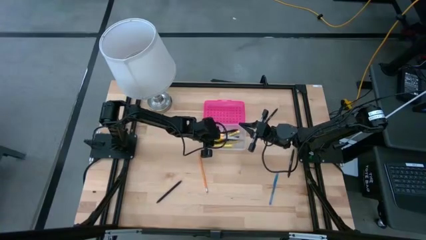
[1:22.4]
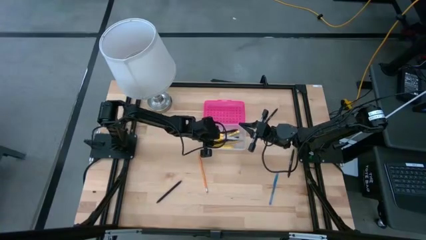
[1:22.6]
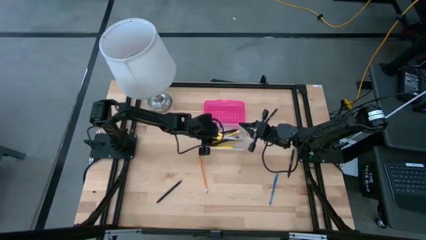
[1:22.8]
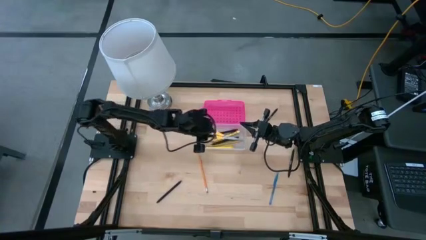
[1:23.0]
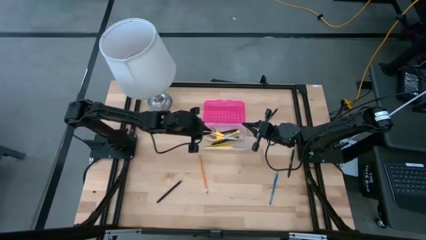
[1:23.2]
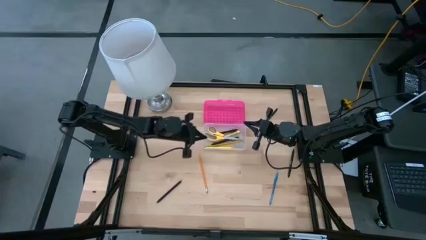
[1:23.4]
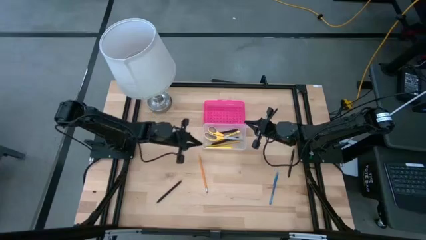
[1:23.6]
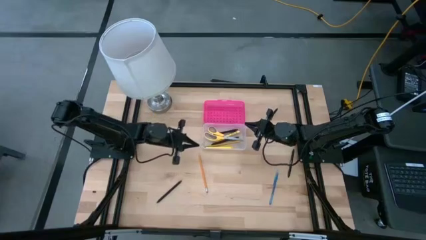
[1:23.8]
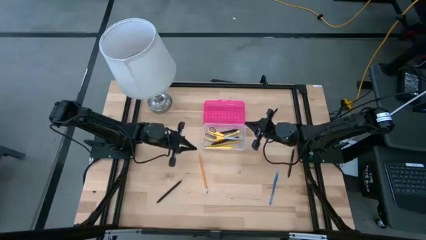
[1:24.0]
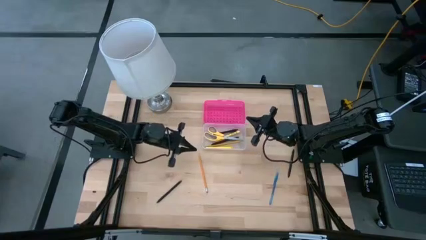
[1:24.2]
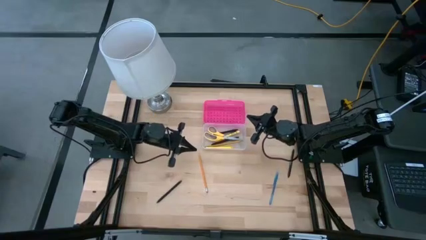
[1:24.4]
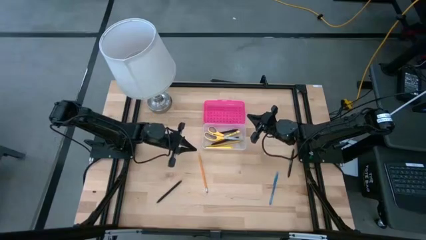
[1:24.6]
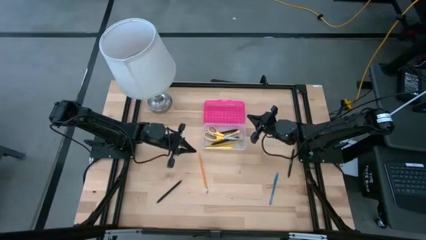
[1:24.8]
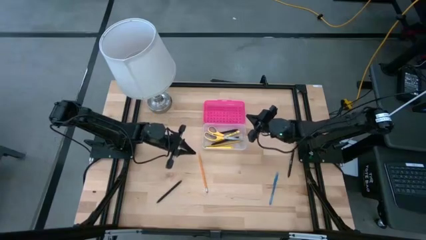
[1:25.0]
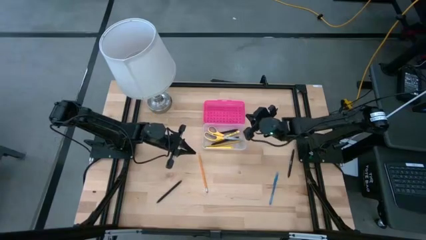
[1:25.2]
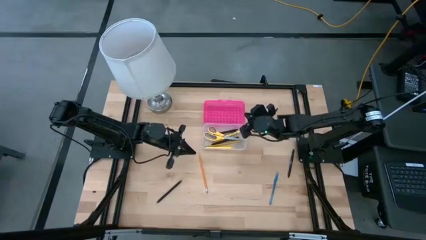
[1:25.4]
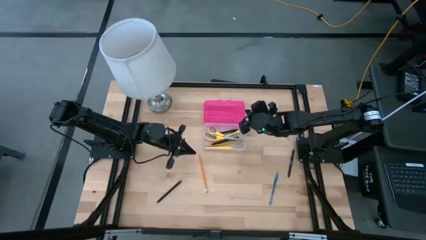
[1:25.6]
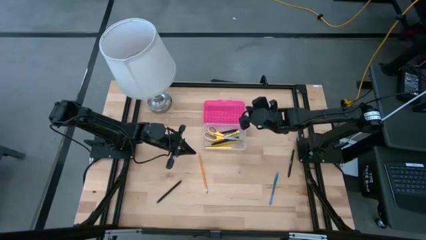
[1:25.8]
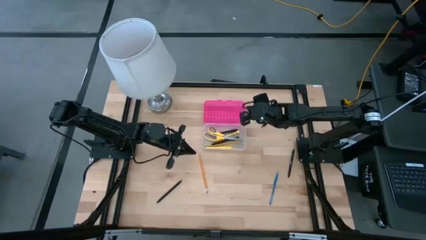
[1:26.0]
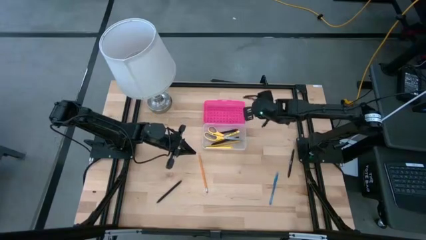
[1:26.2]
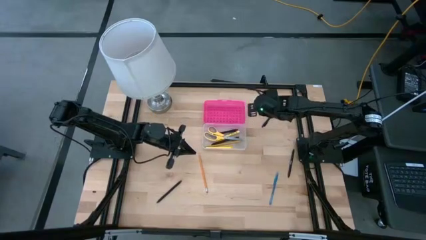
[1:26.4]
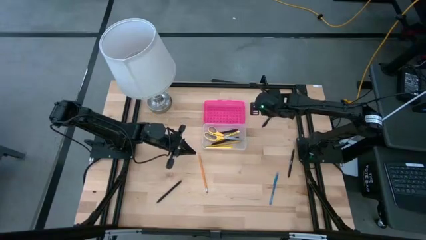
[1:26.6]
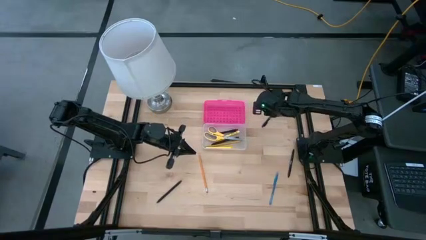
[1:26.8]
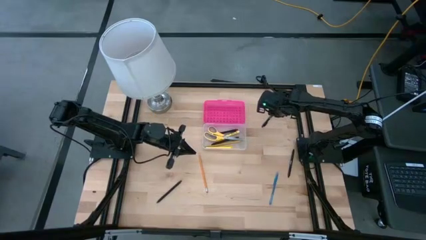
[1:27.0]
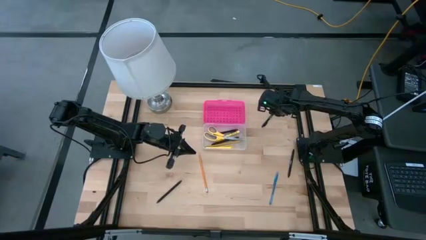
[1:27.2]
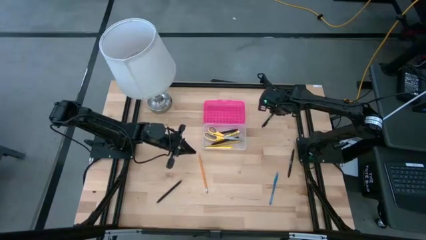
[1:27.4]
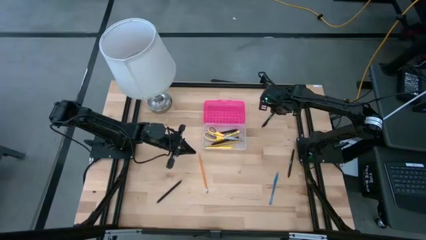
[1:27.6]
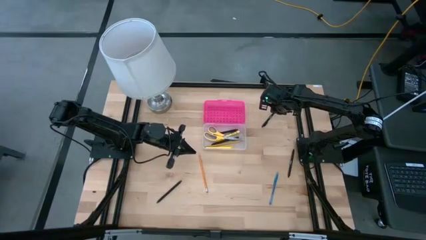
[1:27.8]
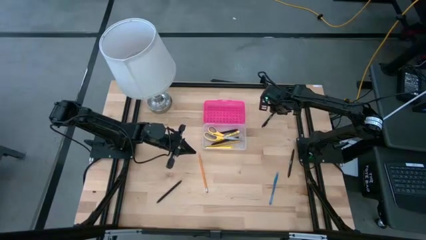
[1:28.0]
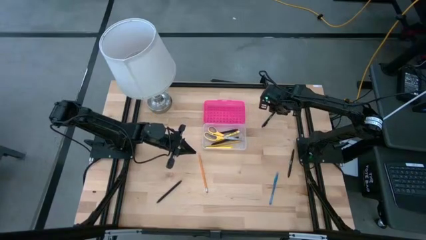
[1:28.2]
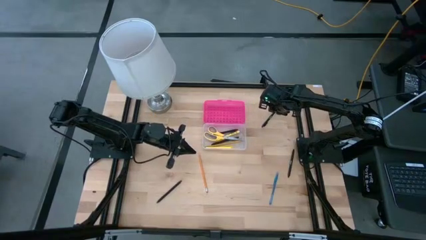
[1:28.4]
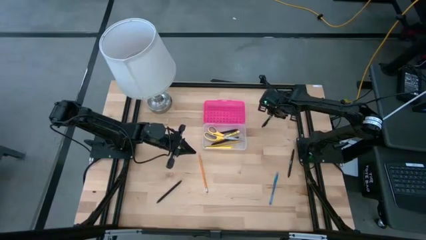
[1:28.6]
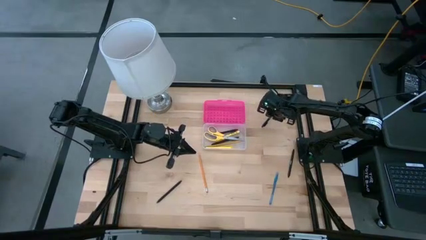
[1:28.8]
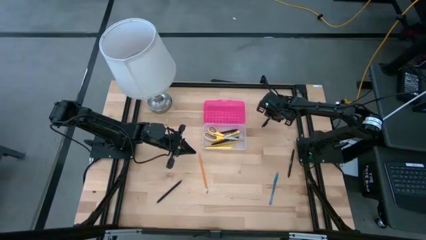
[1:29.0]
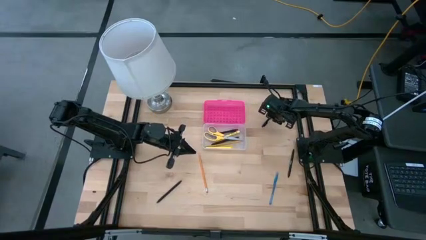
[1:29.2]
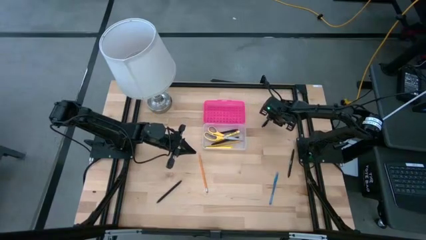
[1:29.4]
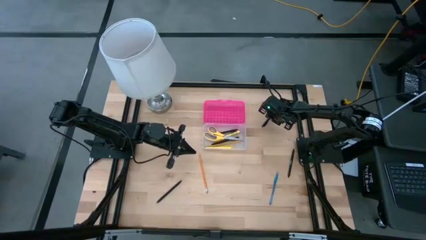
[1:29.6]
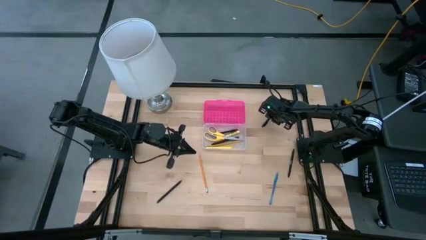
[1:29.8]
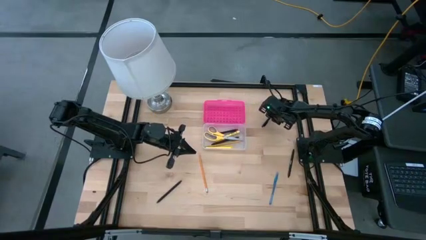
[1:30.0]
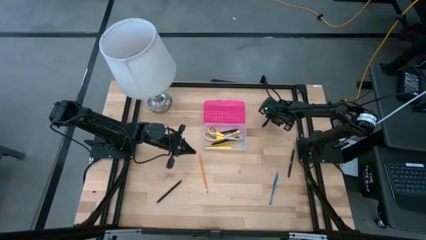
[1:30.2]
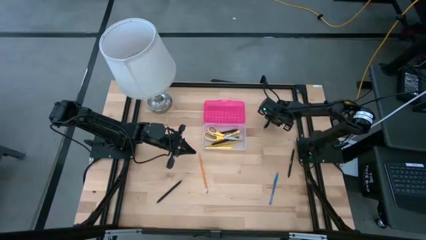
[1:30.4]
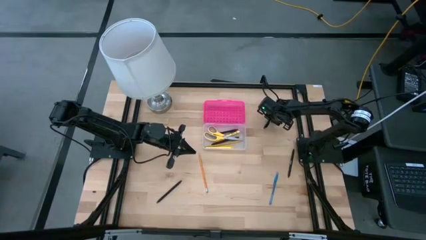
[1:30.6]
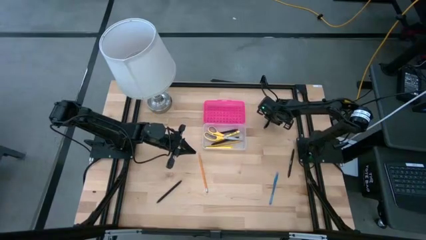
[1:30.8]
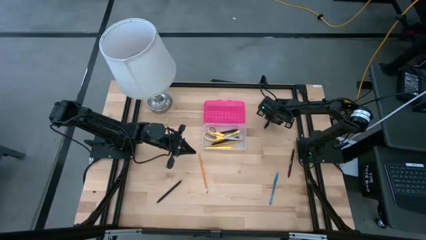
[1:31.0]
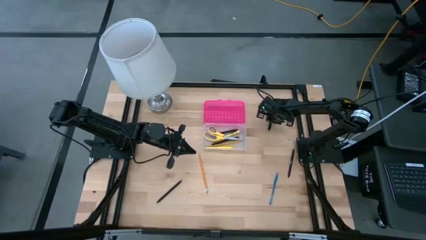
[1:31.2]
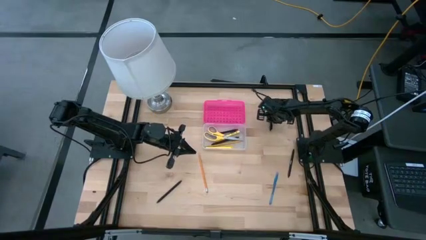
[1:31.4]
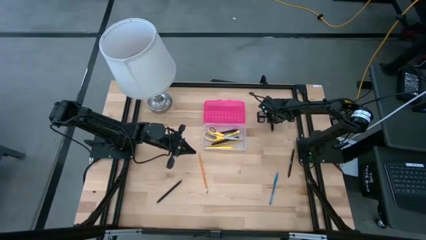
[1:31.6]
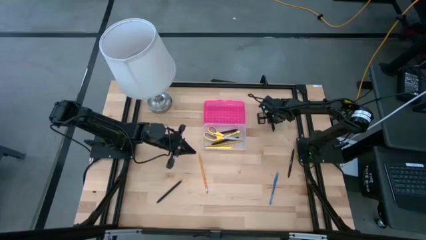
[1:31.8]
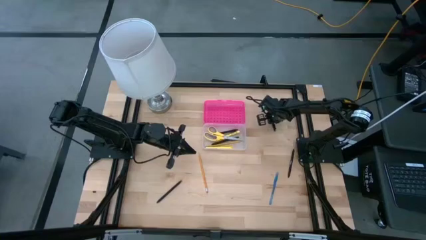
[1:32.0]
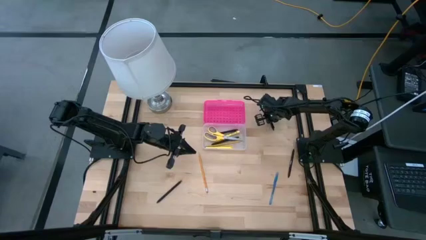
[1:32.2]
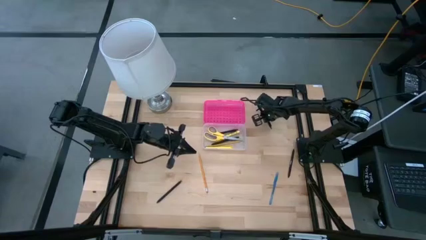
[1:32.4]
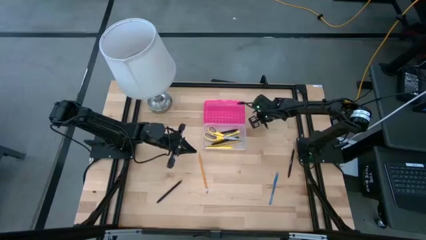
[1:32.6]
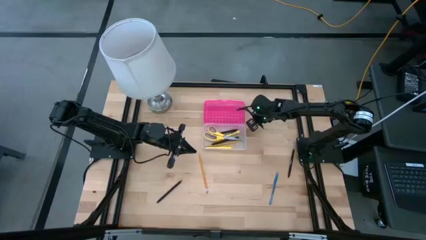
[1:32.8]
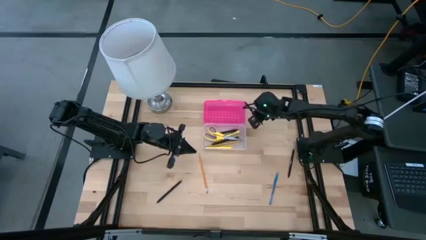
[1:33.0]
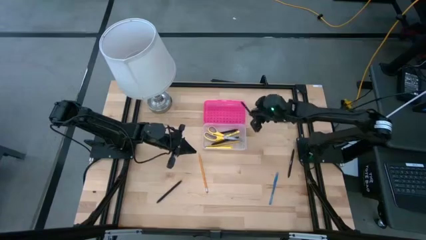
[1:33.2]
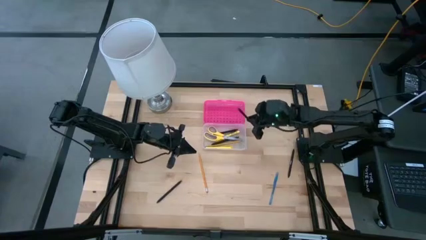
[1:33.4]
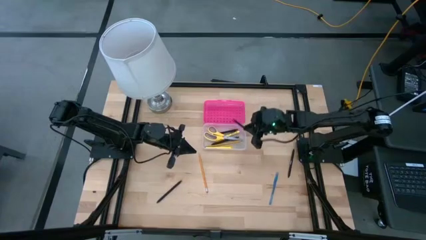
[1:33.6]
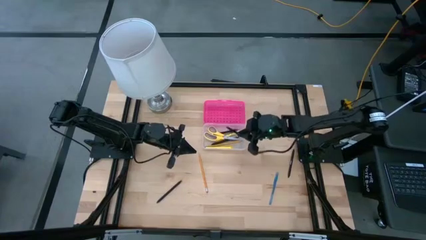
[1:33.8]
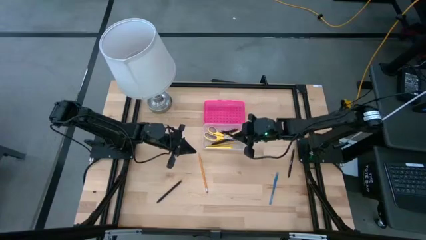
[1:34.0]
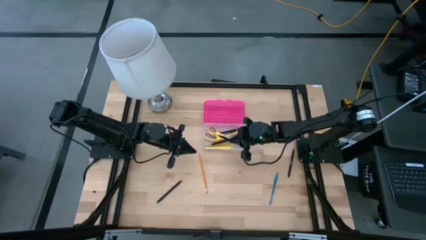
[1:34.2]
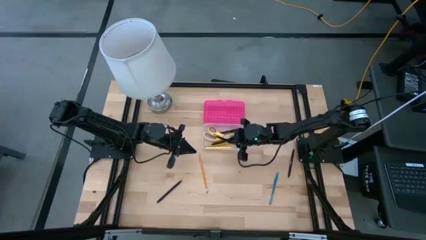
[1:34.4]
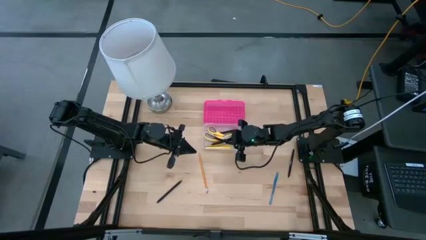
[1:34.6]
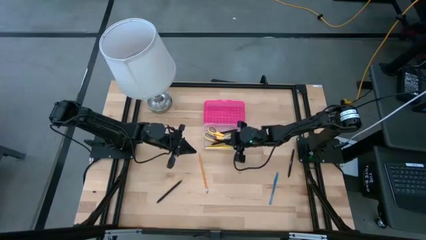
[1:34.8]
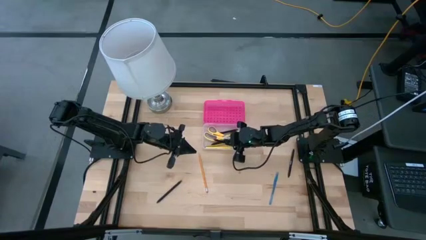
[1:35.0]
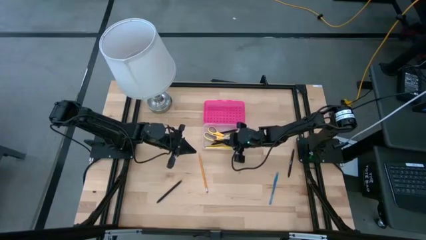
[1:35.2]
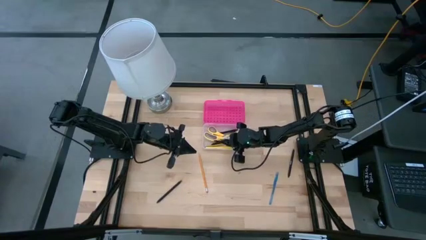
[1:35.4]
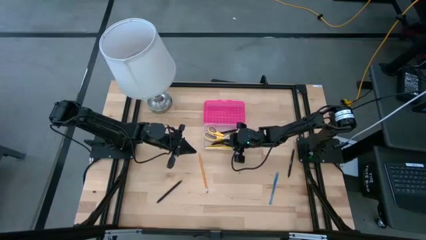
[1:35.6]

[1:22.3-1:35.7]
Task: Pick & place school supplies into a supply box
Put the black pen into the pink supply box

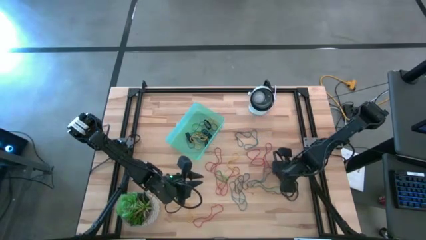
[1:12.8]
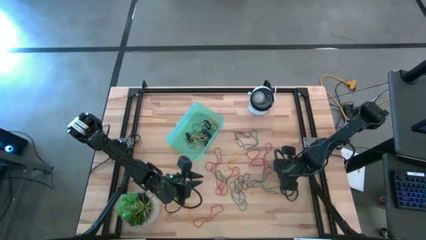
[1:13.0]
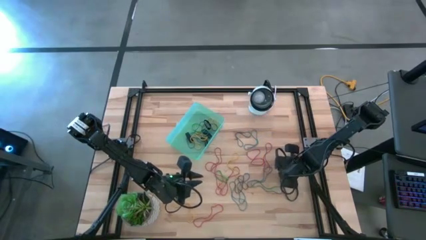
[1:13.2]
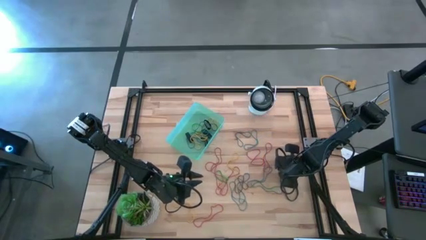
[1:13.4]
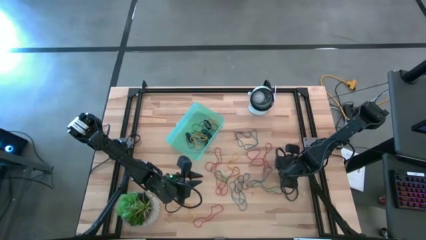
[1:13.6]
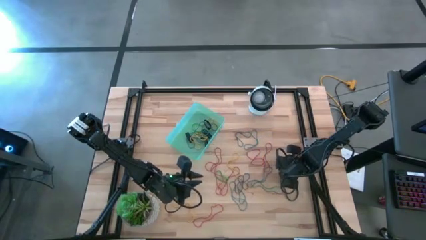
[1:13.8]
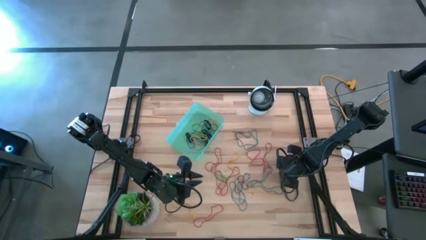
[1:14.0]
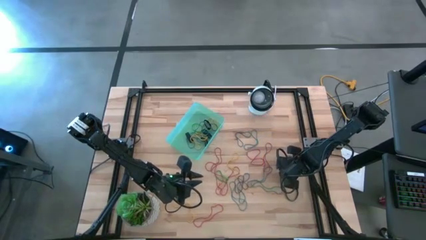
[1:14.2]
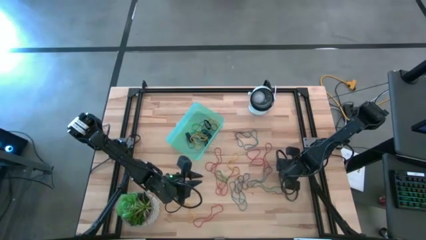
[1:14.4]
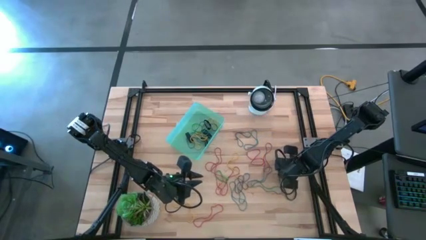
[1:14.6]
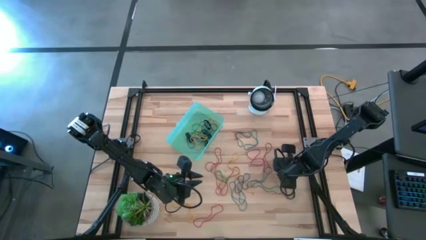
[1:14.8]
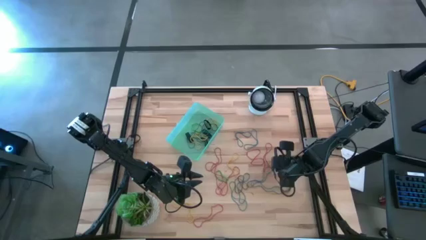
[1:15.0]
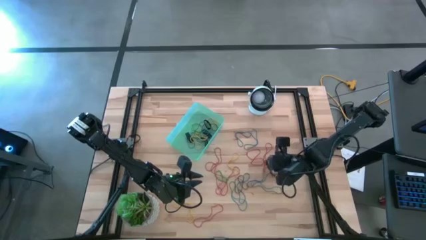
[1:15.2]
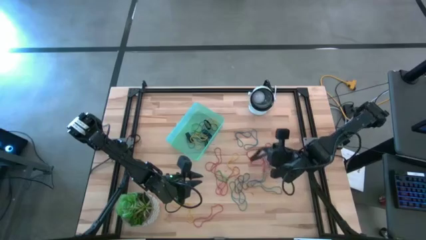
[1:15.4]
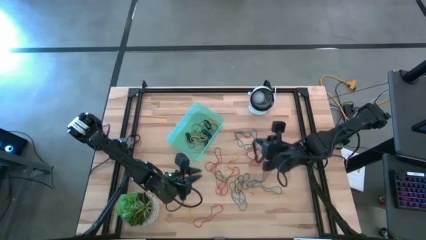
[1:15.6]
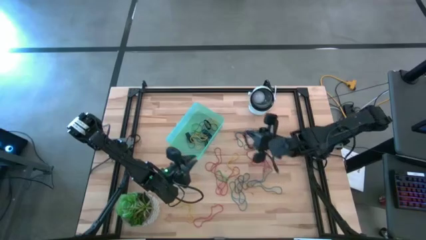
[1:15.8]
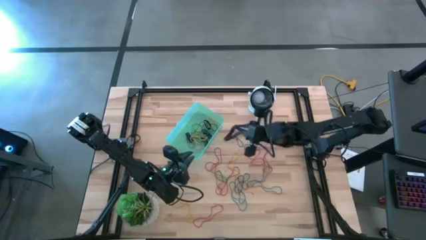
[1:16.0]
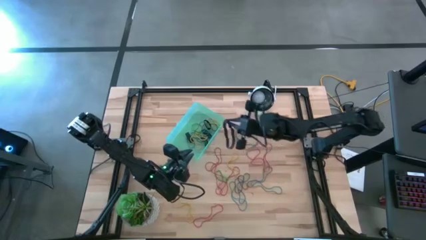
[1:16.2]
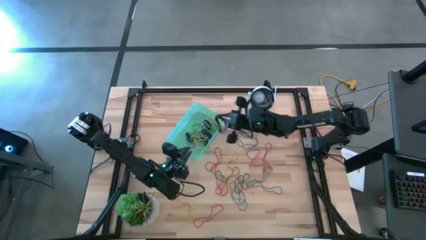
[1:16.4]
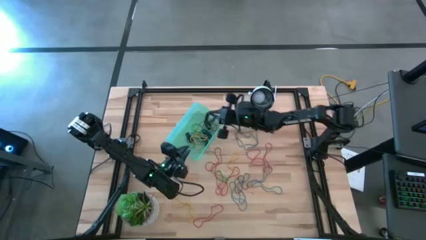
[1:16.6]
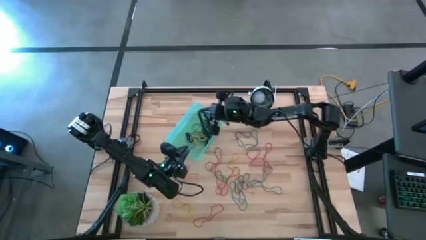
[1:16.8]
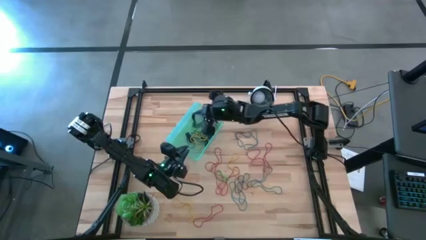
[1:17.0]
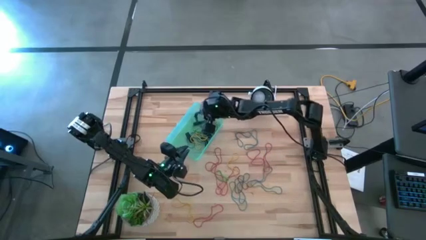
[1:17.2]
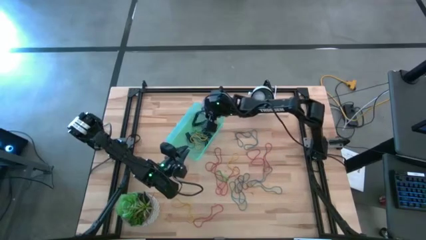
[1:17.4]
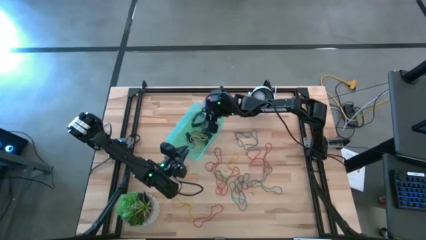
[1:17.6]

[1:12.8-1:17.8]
Task: Pick and place rubber bands into bin
Put the black rubber band into the green bin
